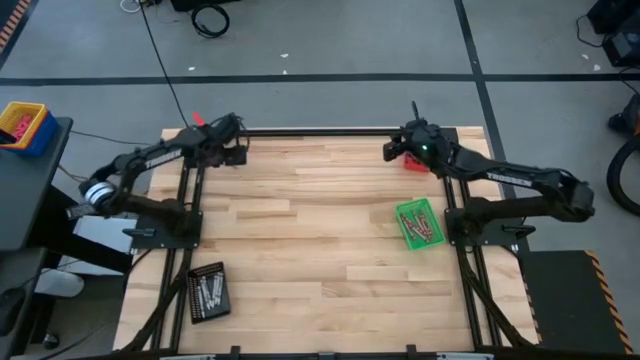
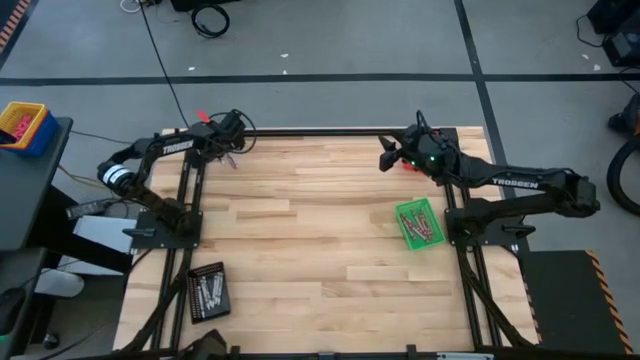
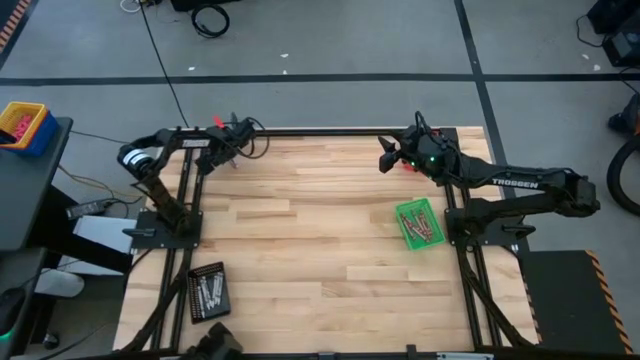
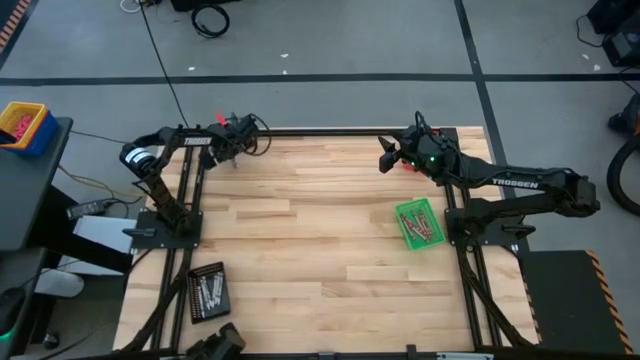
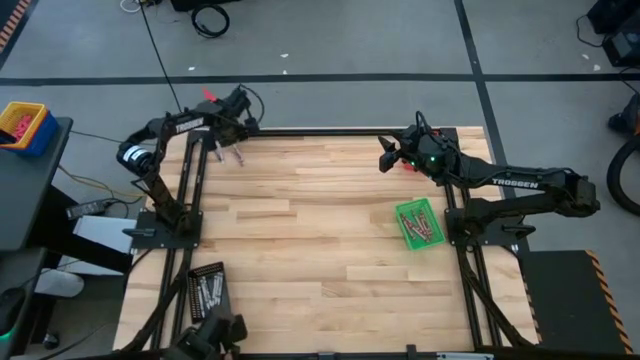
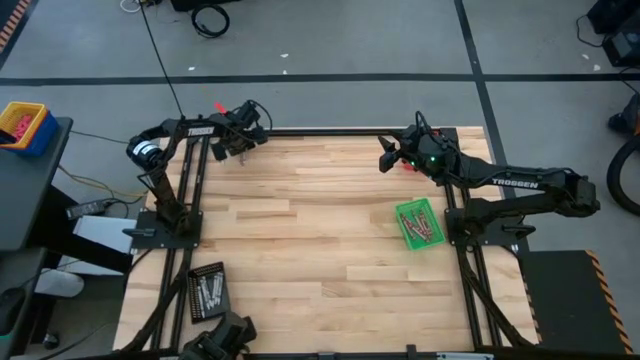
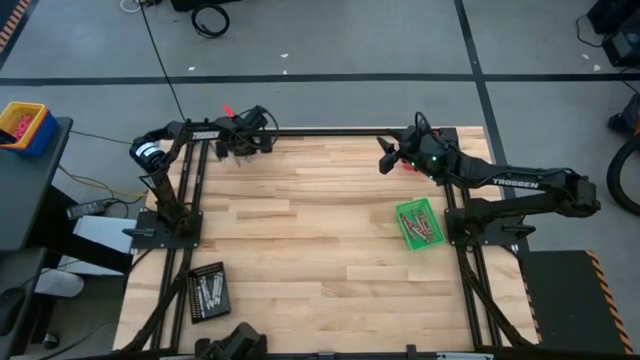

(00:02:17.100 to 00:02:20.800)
Task: Sort crayons
Put the white crayon into the black bin

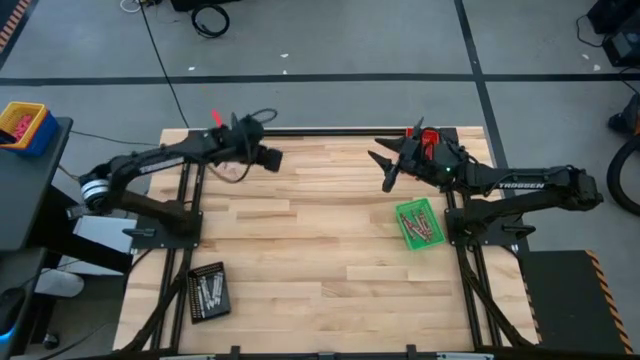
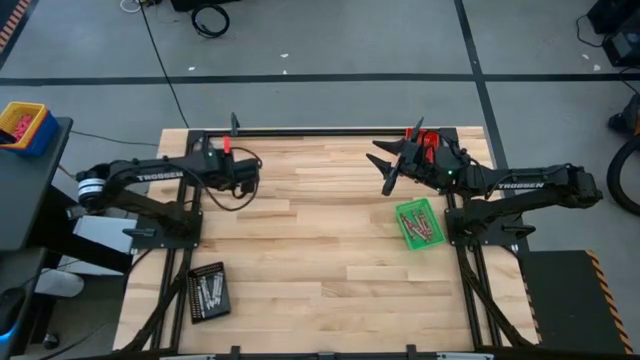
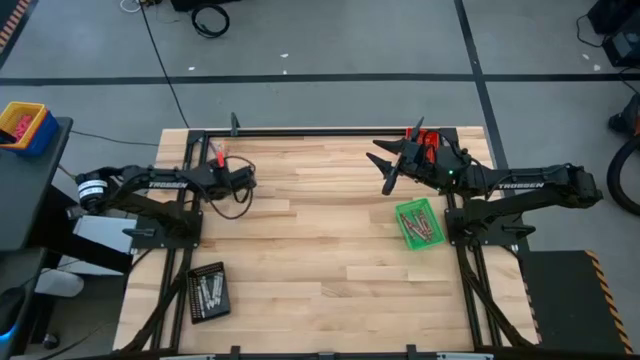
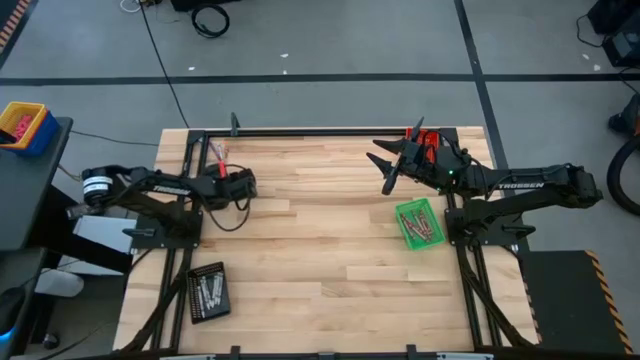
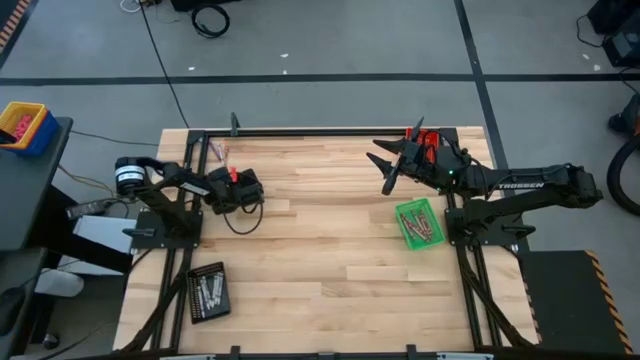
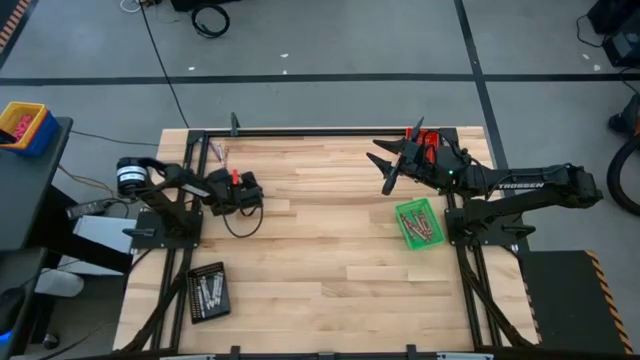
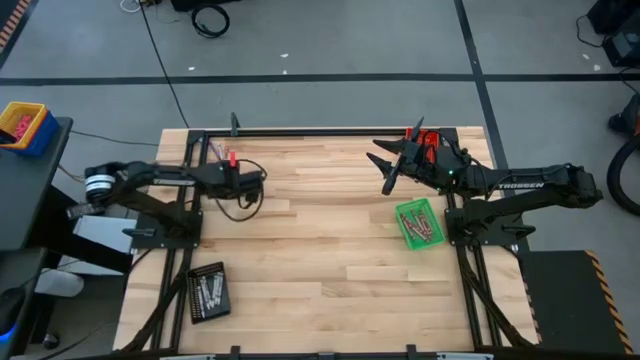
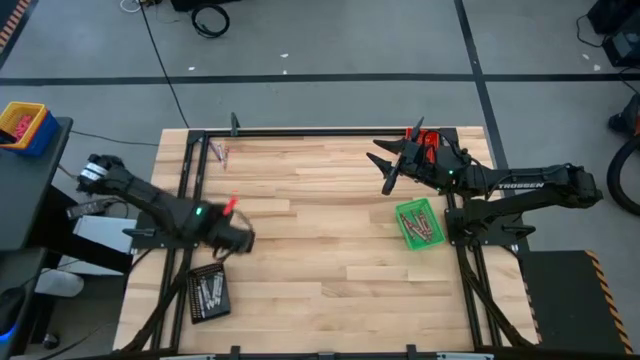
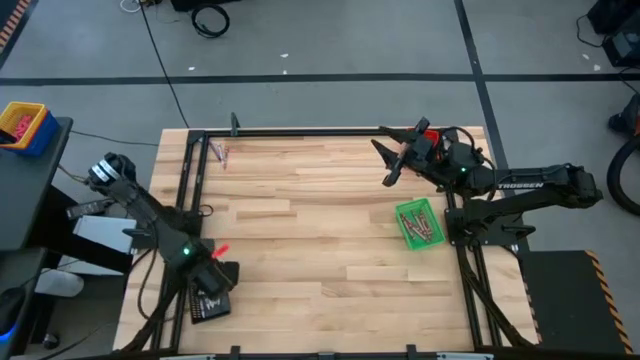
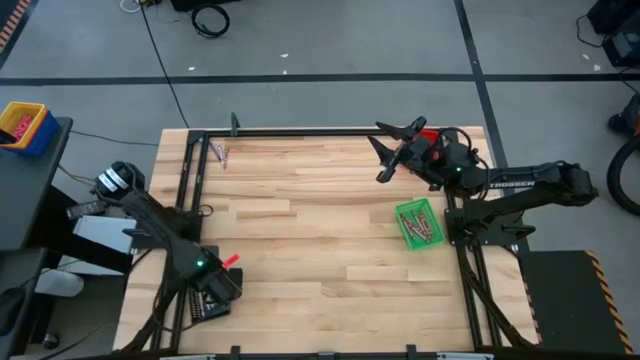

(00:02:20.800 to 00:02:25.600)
Put the white crayon into the black bin

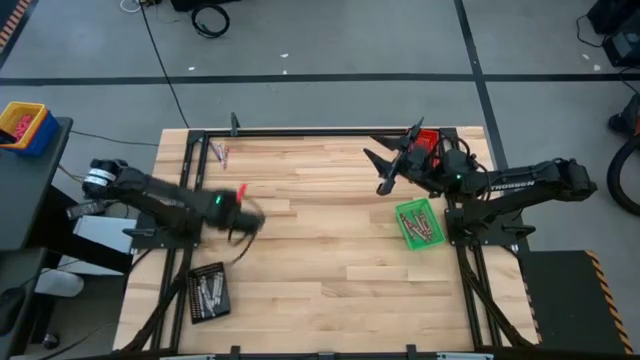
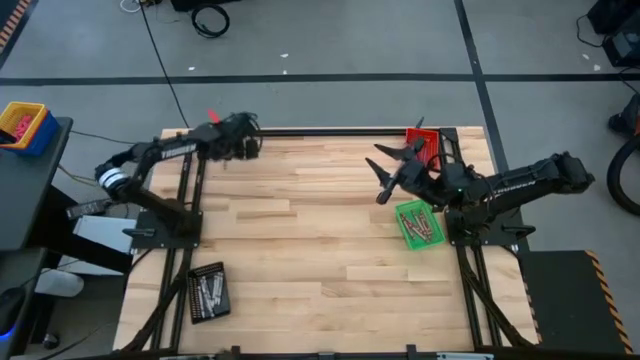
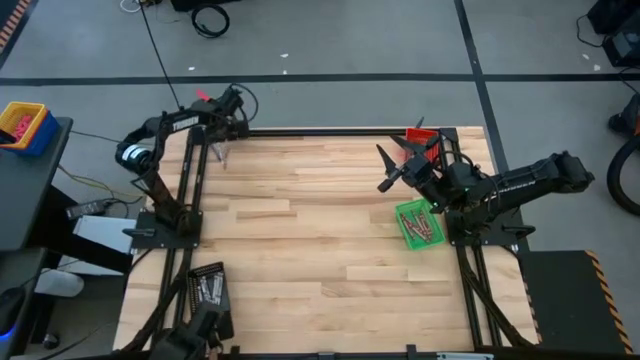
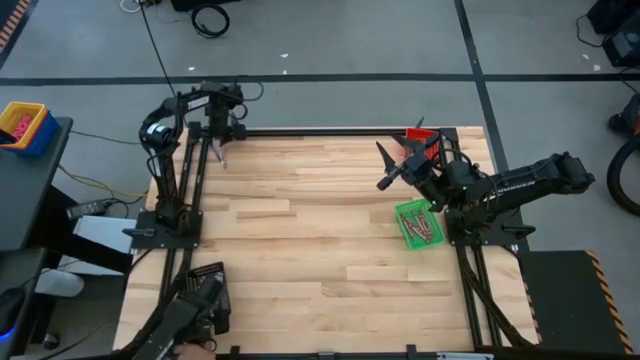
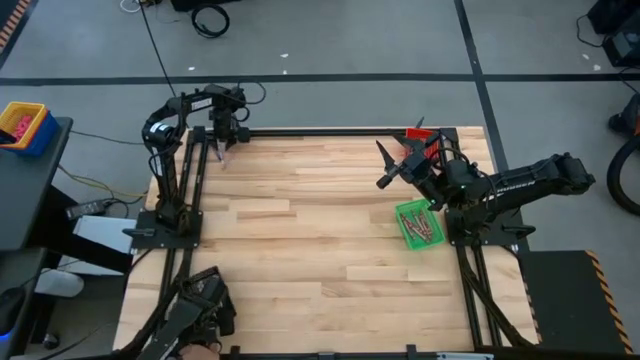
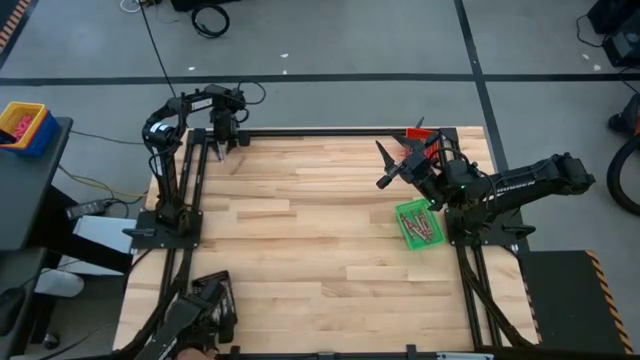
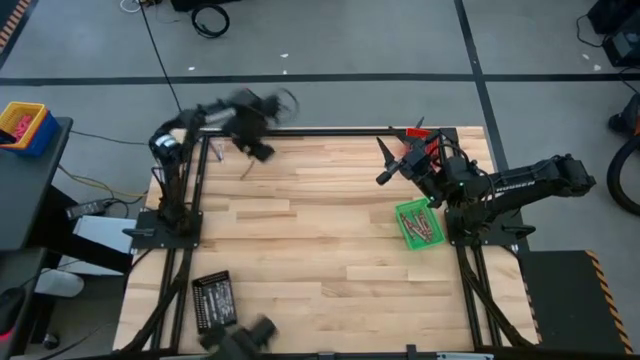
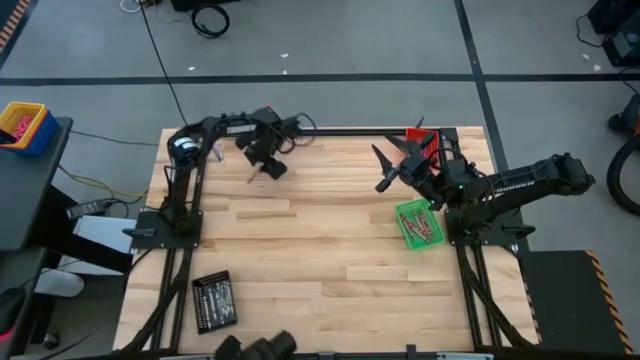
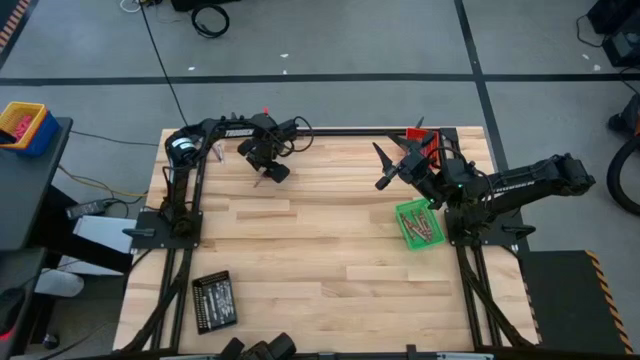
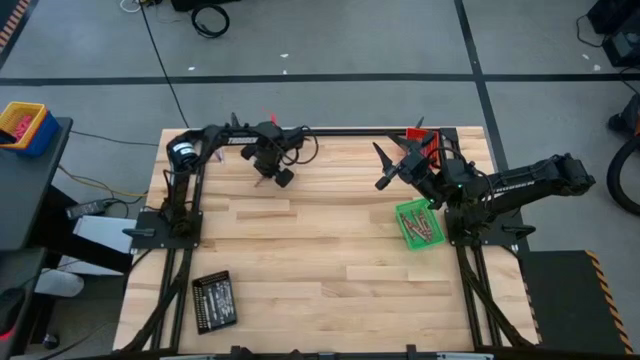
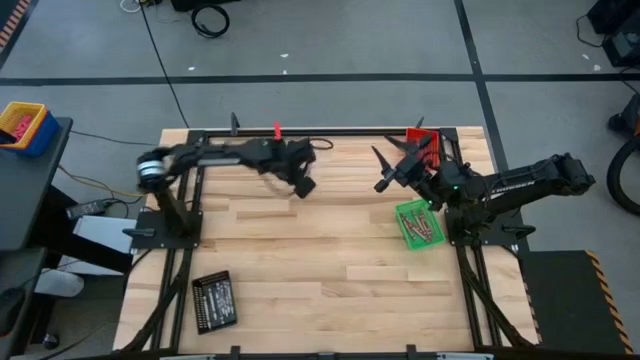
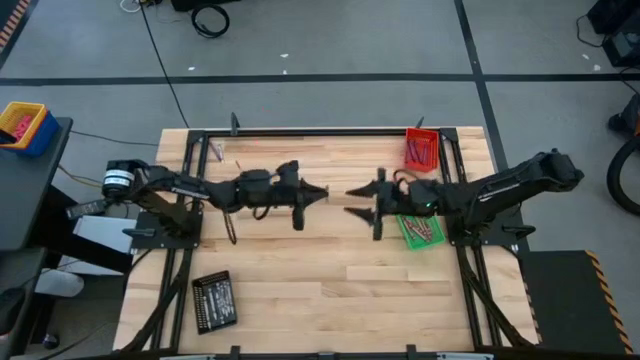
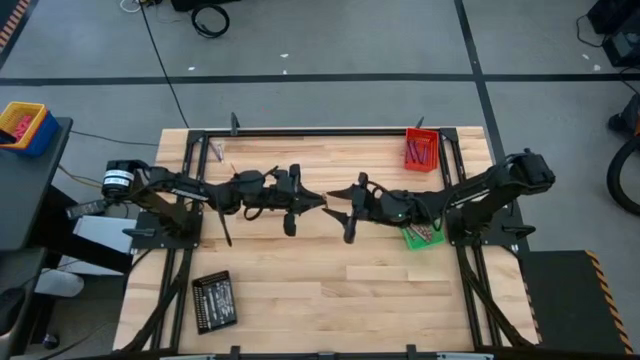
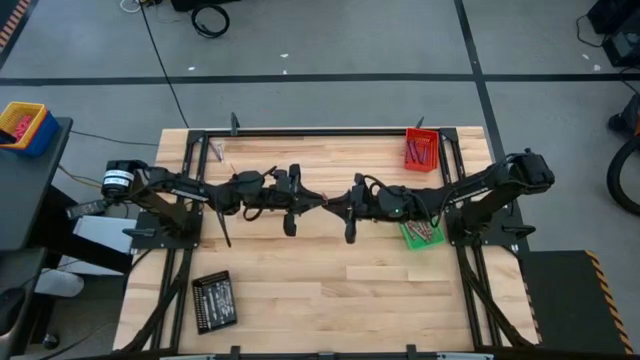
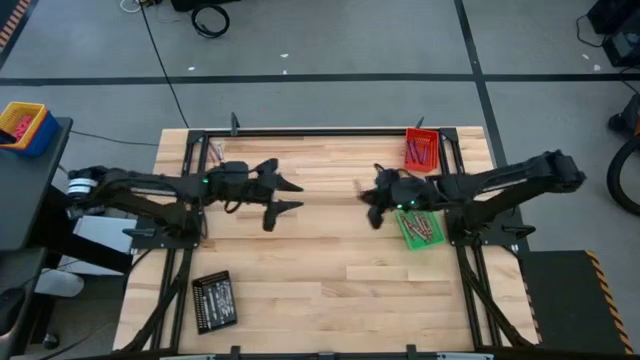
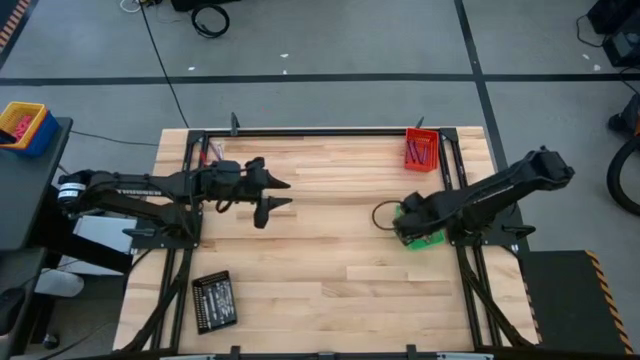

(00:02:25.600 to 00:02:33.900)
Put the pink crayon into the green bin

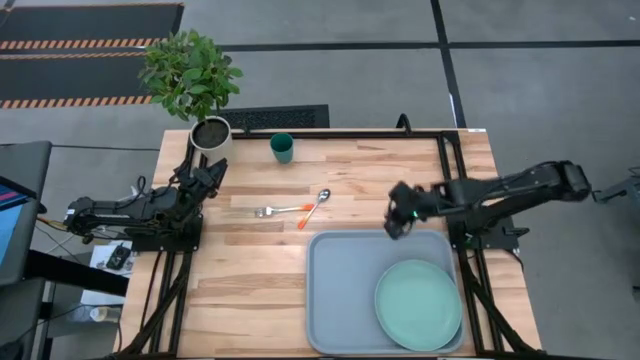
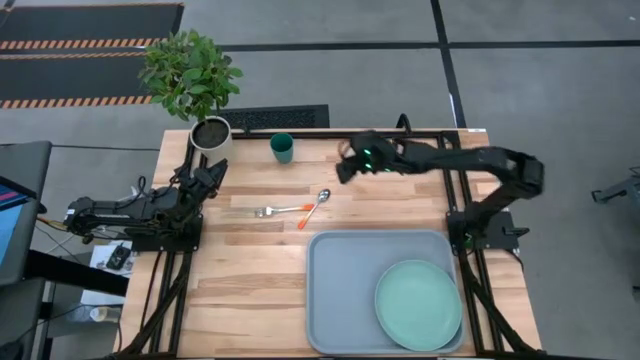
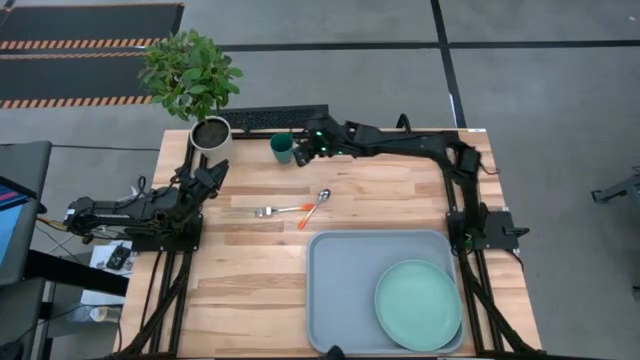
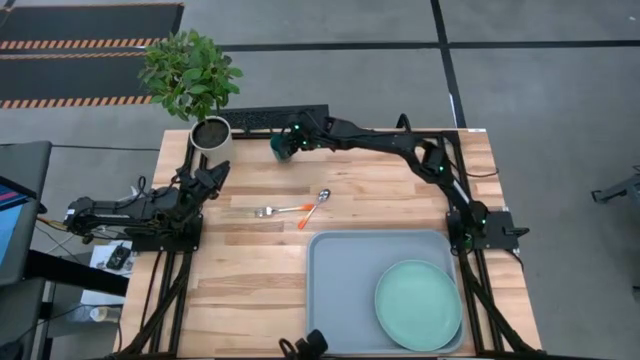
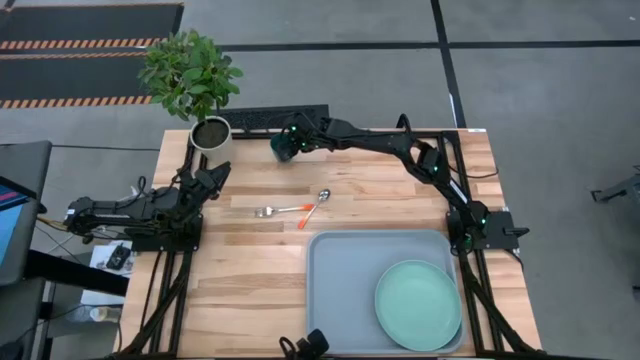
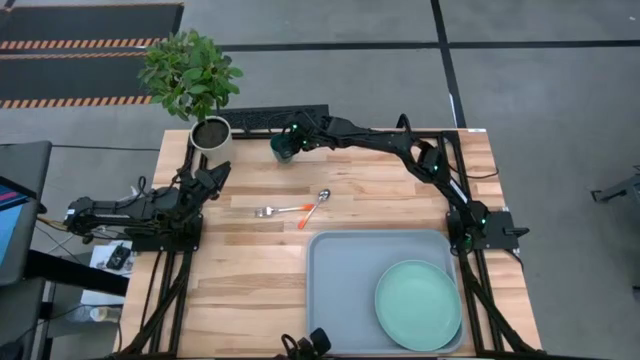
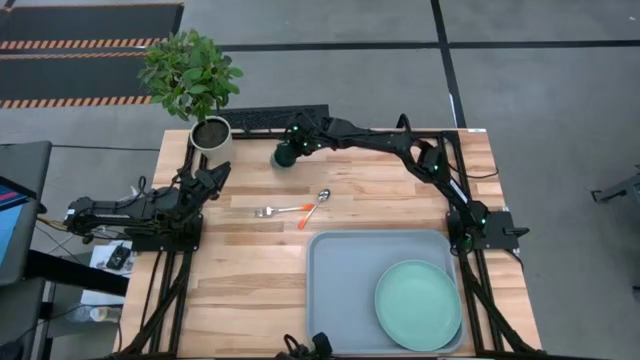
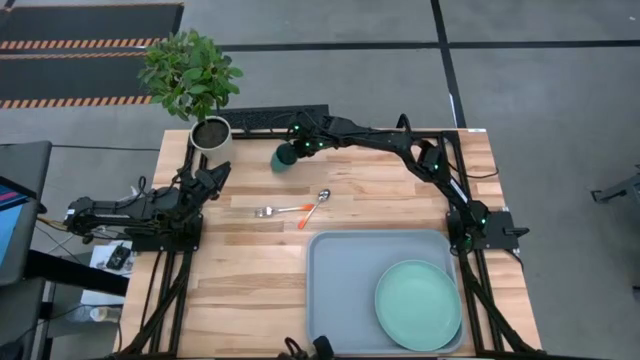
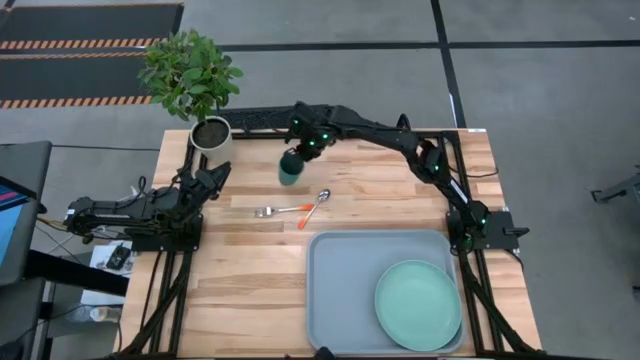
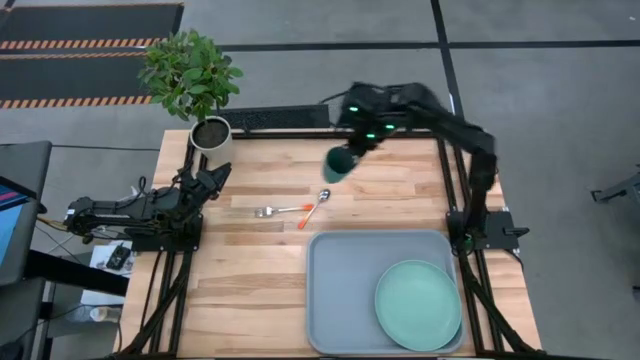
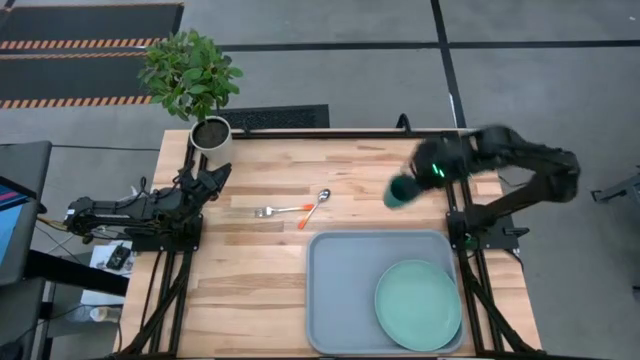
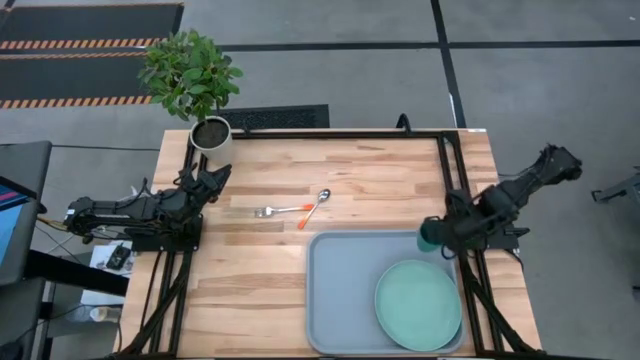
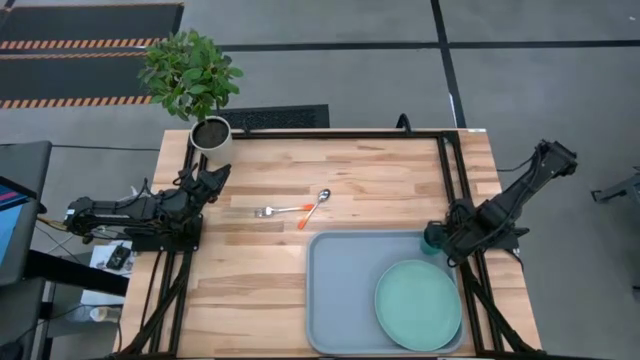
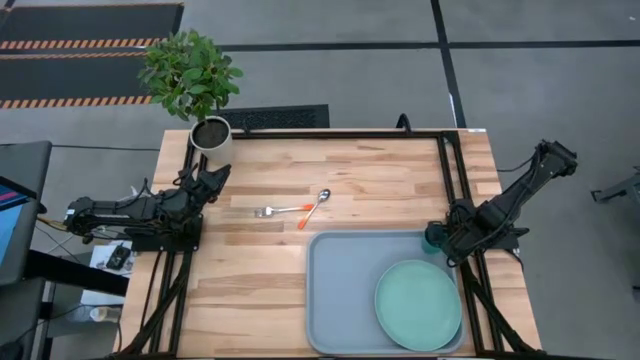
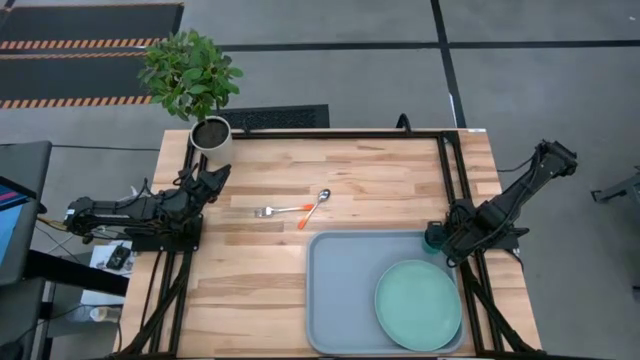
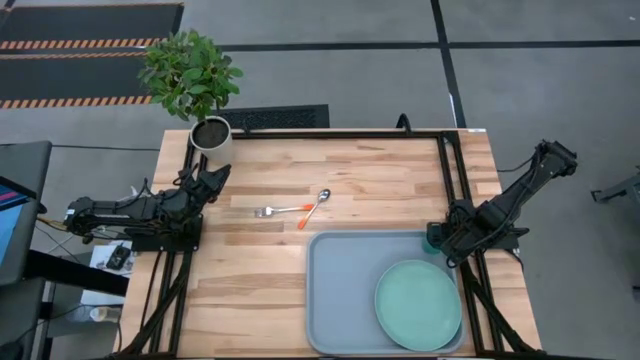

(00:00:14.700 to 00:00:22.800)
Task: Pick and place plate/cup/fork/spoon on tray
Put the green cup on the top right of the light blue plate on the blue tray
